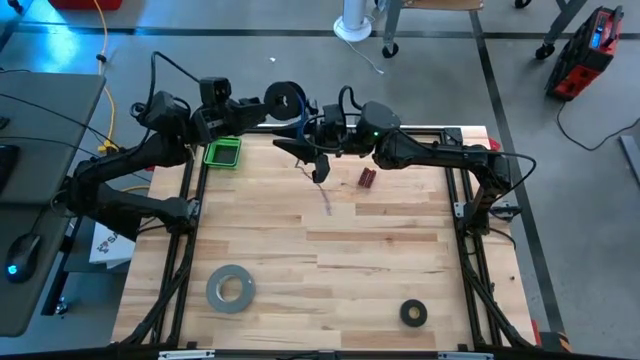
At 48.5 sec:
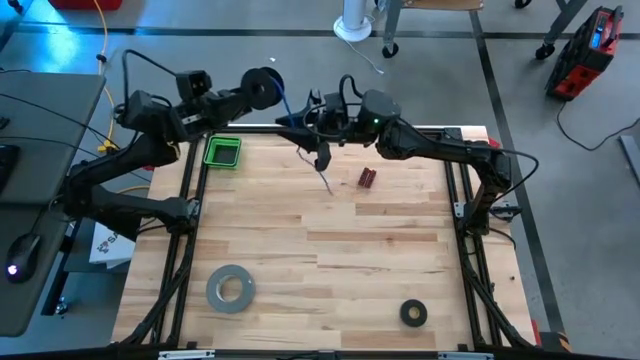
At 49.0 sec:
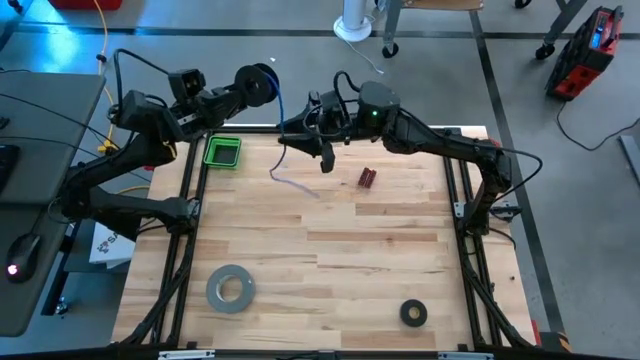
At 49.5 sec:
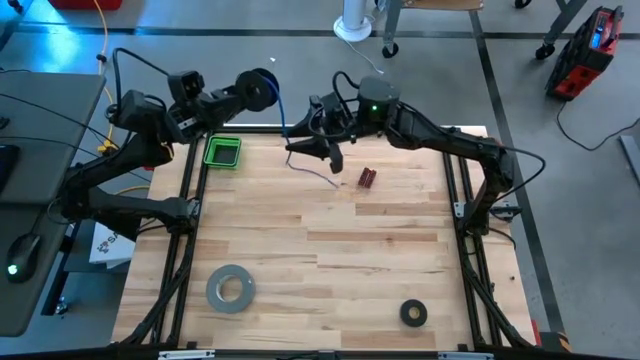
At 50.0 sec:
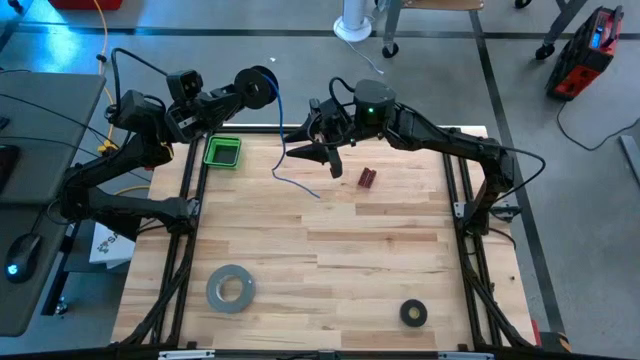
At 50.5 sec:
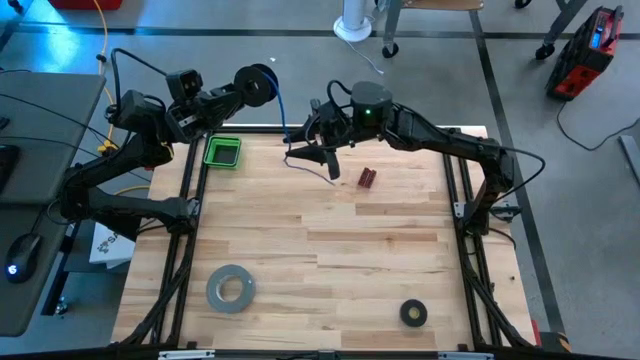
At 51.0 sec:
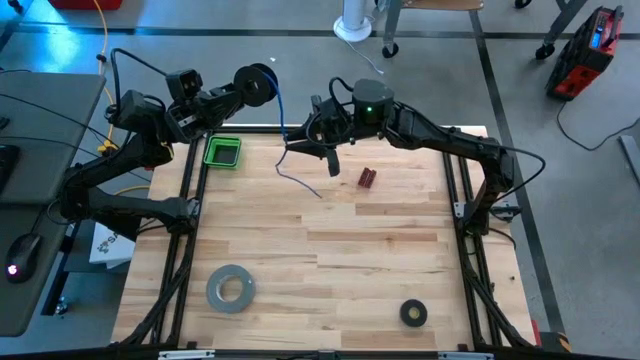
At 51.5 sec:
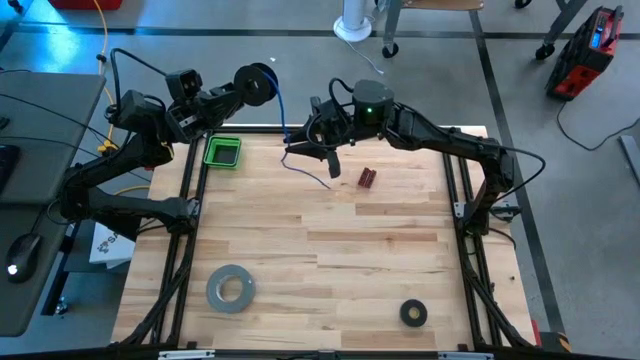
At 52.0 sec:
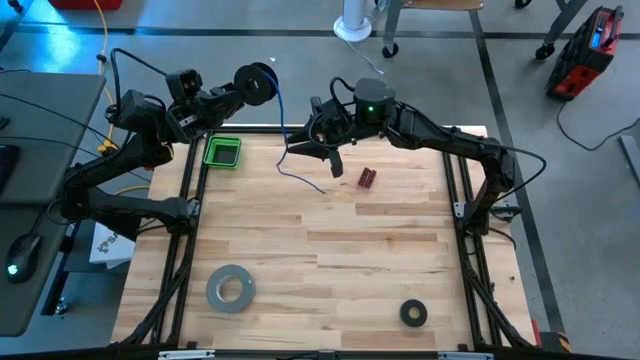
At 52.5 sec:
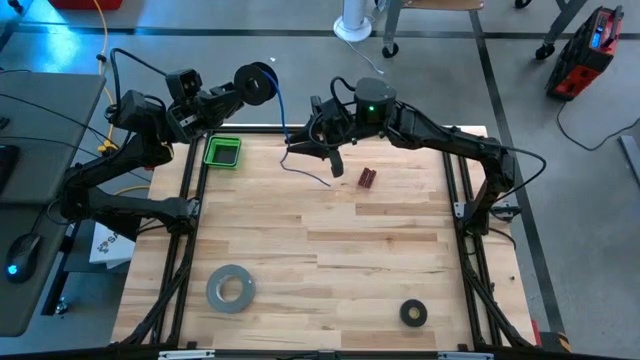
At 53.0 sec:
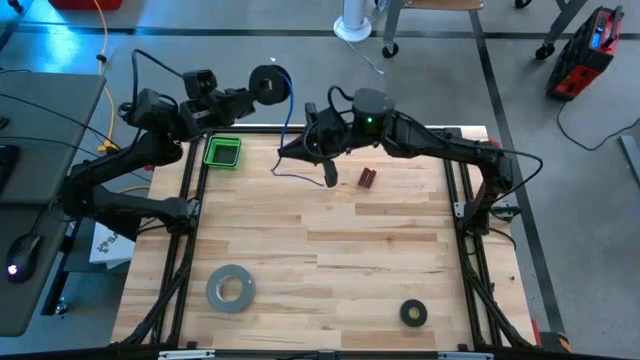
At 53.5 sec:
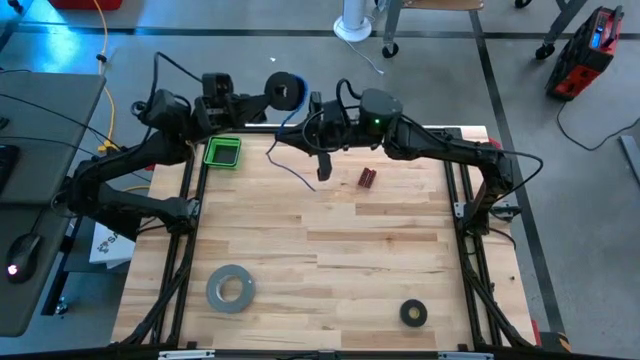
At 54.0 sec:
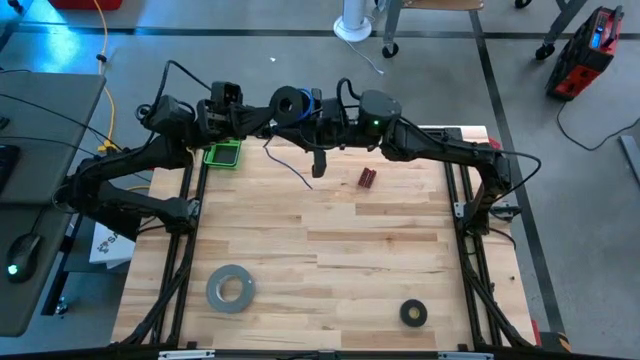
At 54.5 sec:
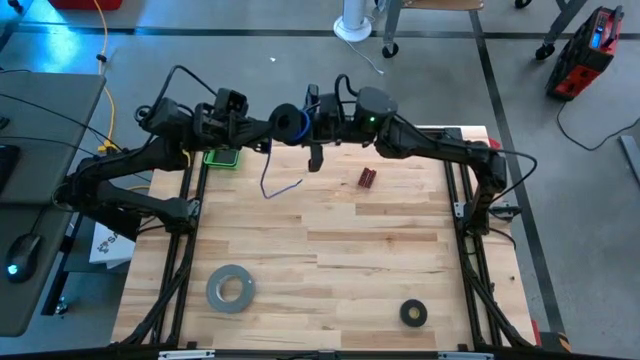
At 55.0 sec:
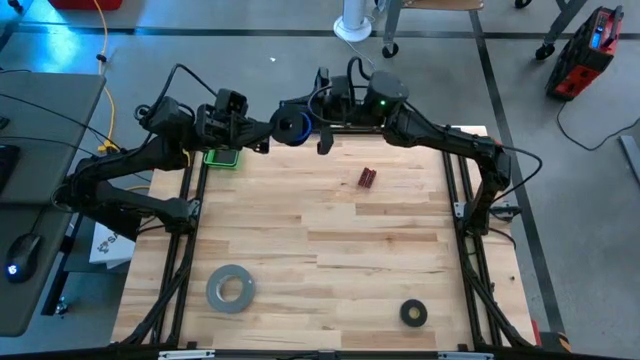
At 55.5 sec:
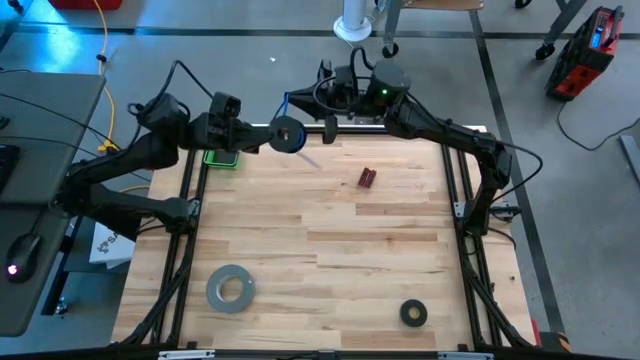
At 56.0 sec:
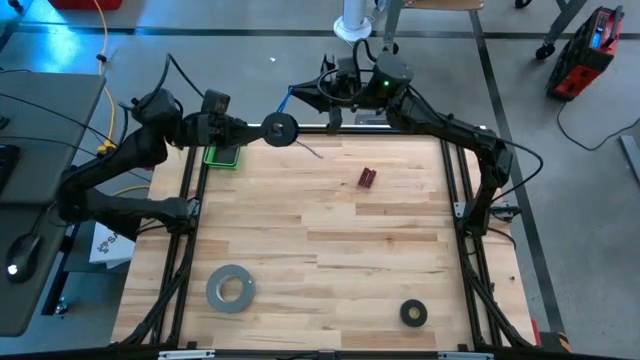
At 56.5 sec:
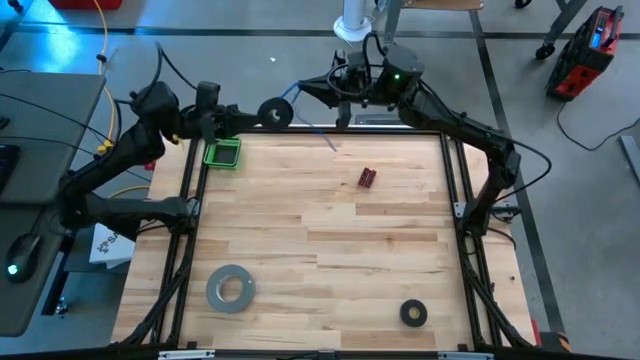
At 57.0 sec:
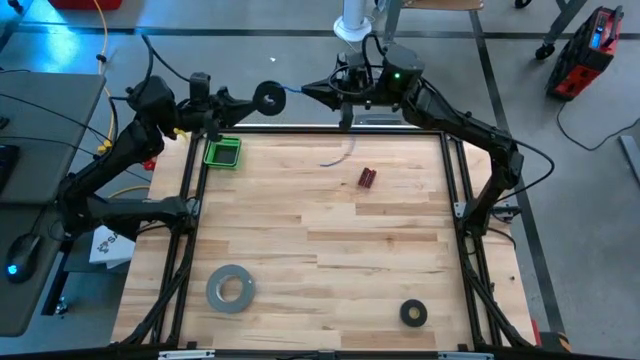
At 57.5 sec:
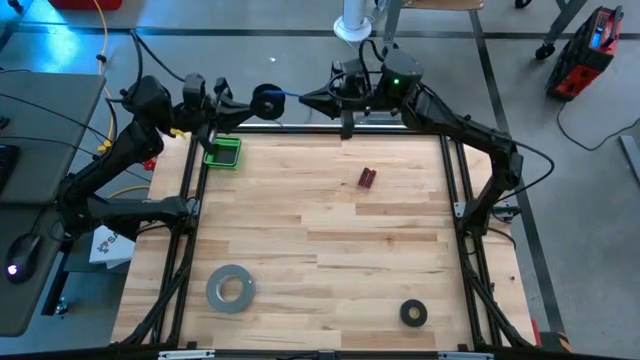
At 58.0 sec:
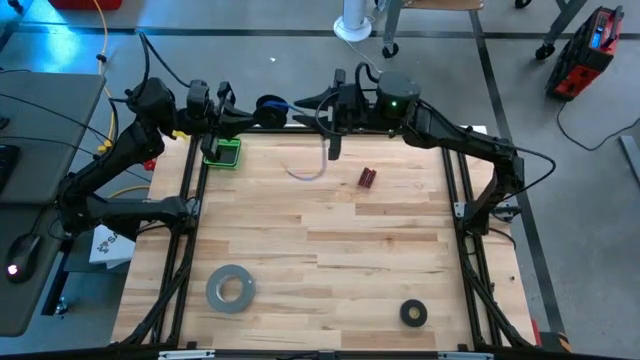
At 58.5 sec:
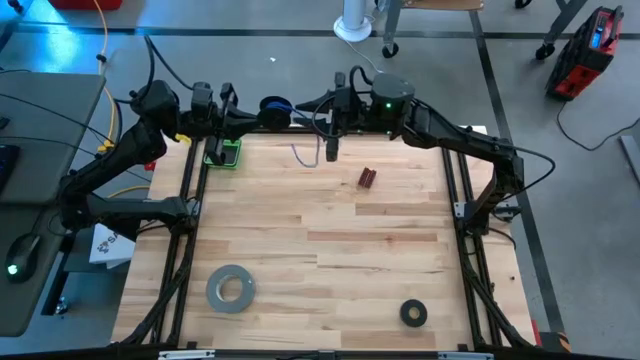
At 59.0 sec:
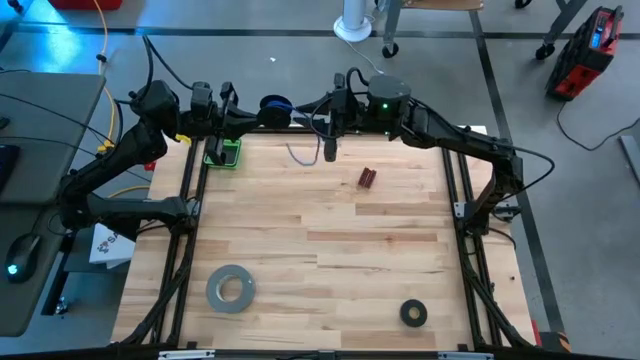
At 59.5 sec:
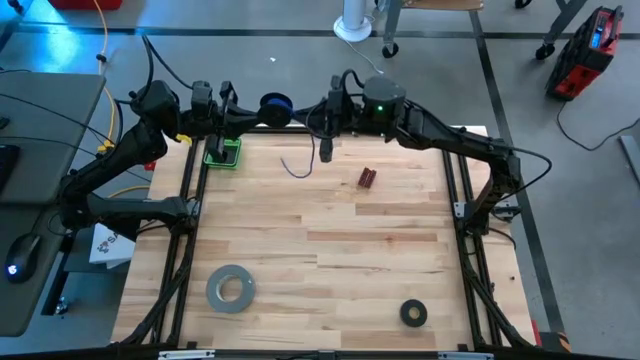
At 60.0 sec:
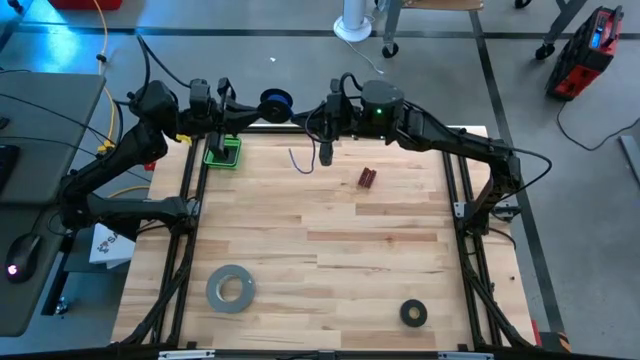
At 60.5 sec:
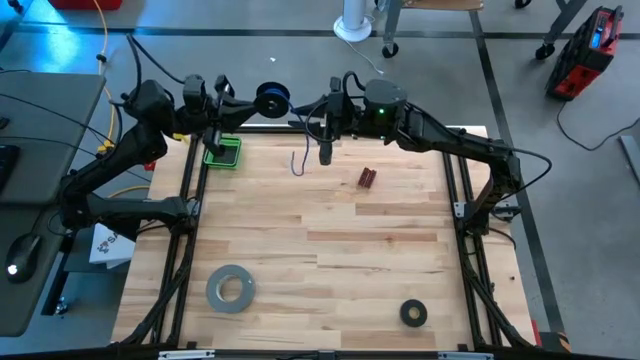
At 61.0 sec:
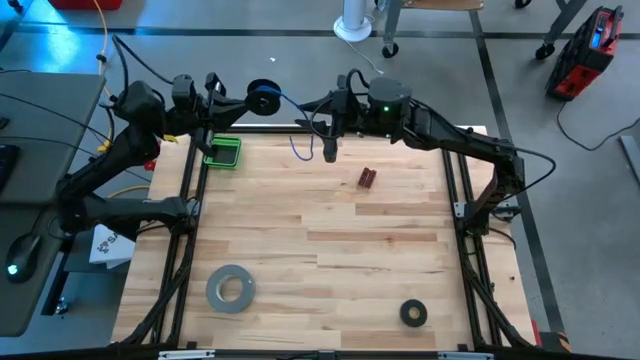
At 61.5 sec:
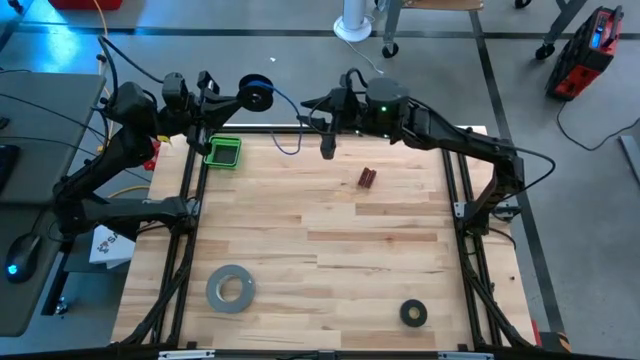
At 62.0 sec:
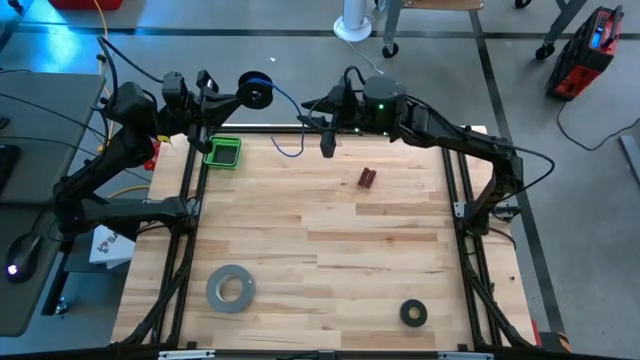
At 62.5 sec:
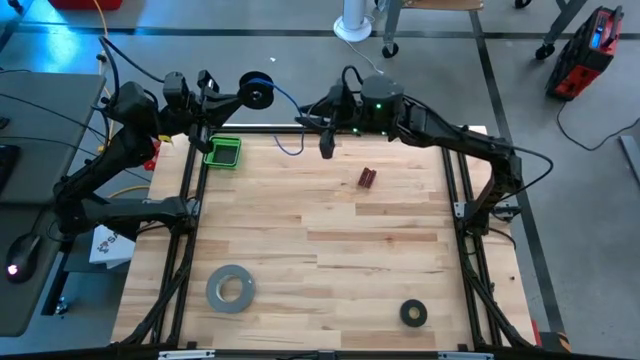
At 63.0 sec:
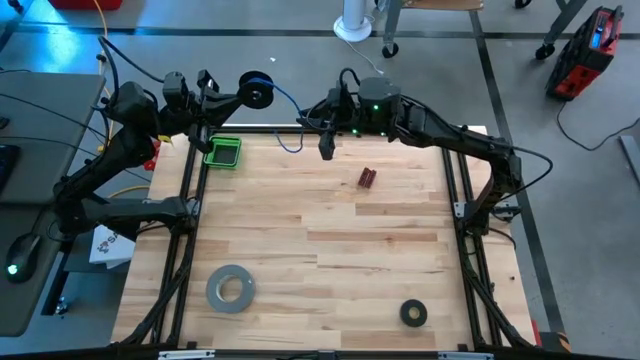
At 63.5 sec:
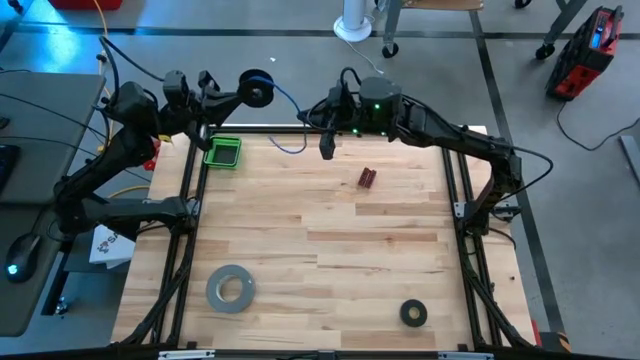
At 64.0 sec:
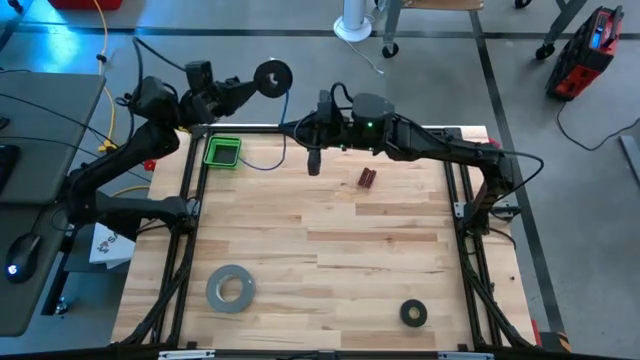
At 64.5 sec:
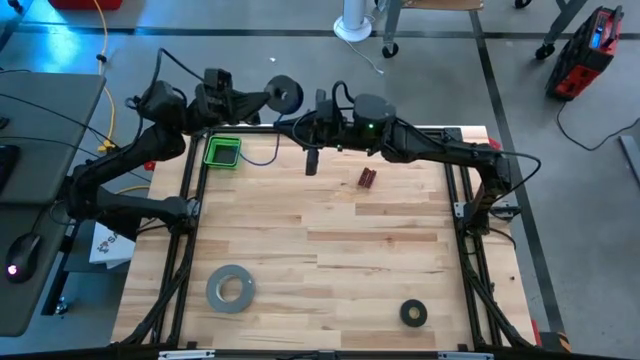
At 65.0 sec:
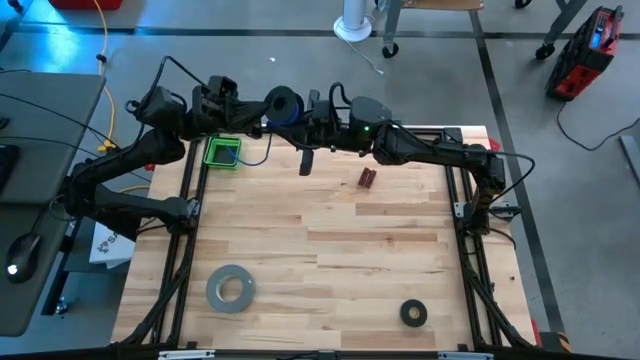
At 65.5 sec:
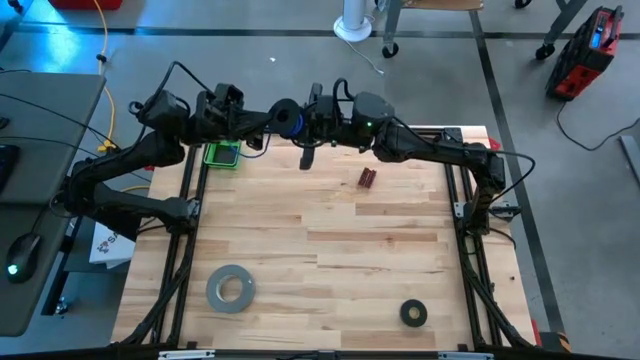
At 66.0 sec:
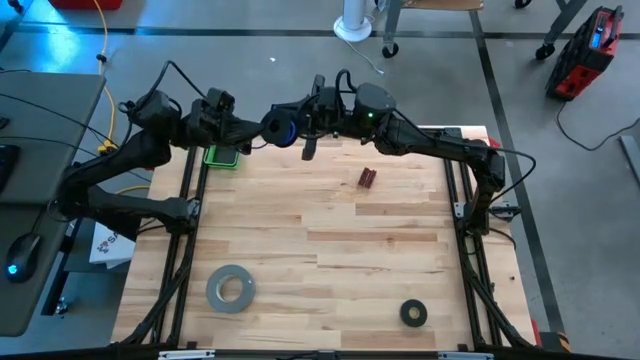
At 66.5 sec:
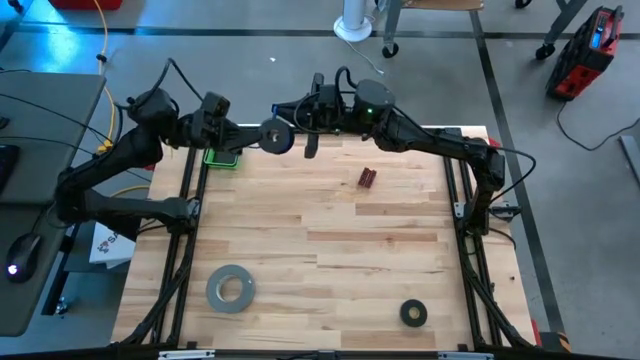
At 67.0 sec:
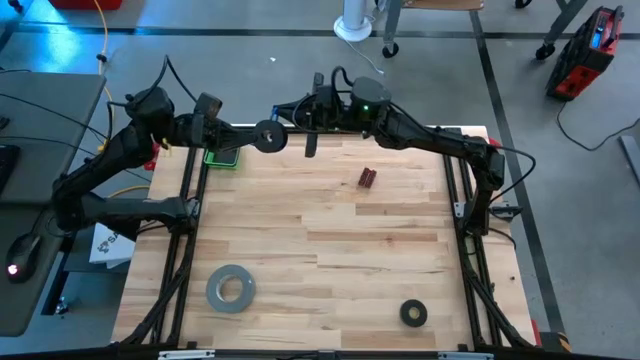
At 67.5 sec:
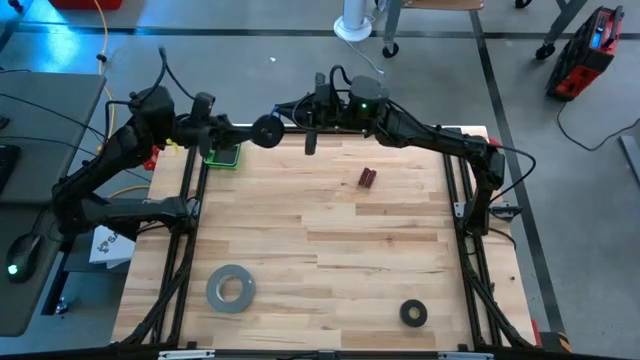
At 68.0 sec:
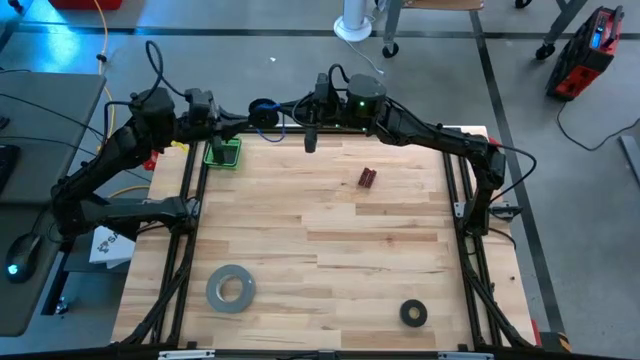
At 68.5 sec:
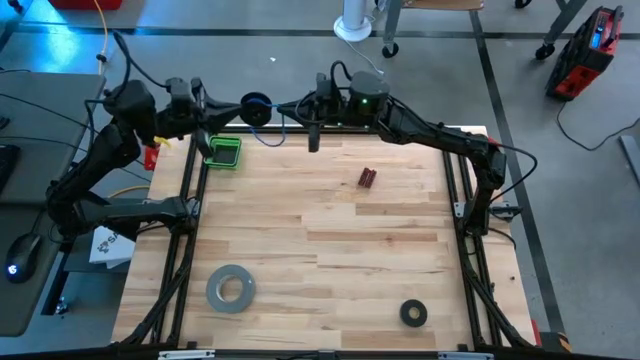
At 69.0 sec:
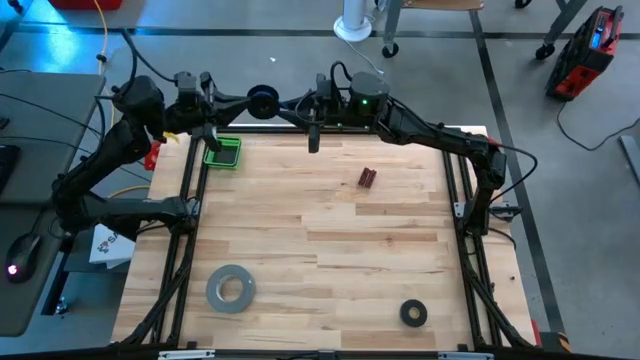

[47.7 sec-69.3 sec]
Task: Coil cords
Coil the blue wire onto the spool

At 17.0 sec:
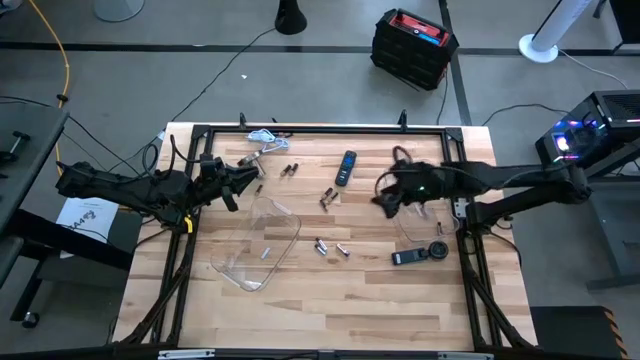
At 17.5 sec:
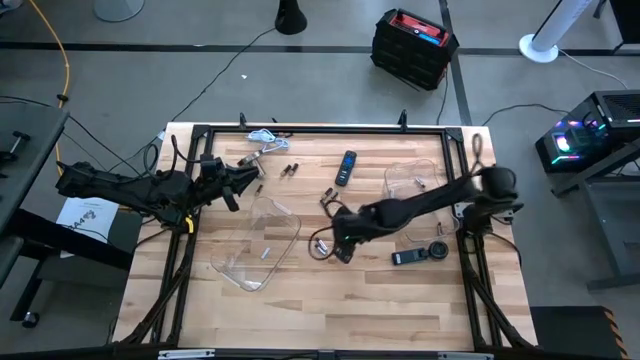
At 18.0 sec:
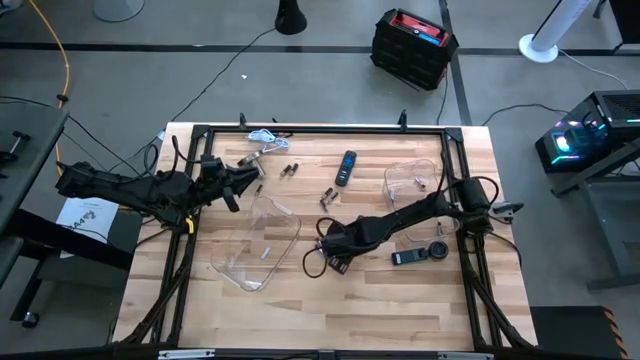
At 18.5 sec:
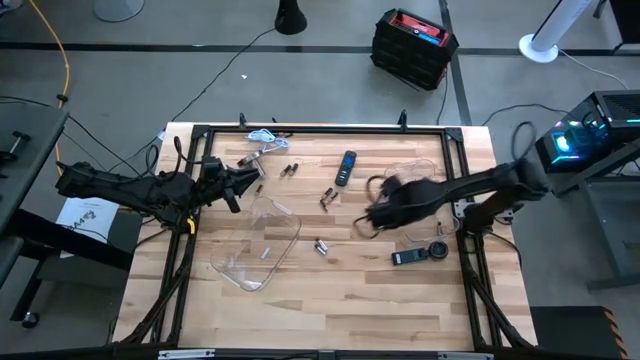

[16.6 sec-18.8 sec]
Task: Sort batteries
Put the white battery into the right transparent bin
